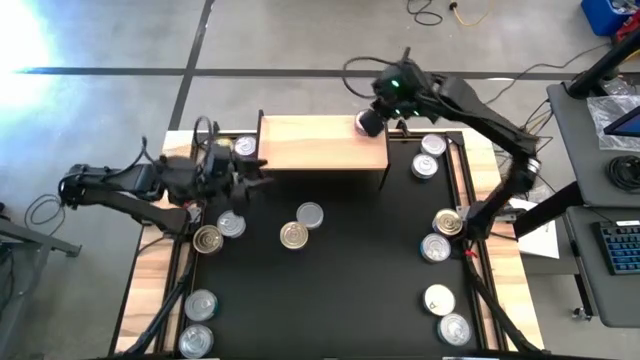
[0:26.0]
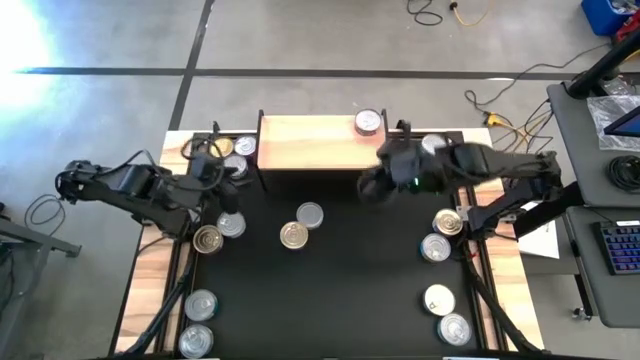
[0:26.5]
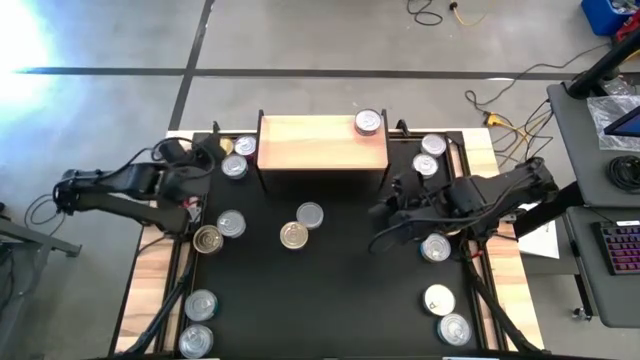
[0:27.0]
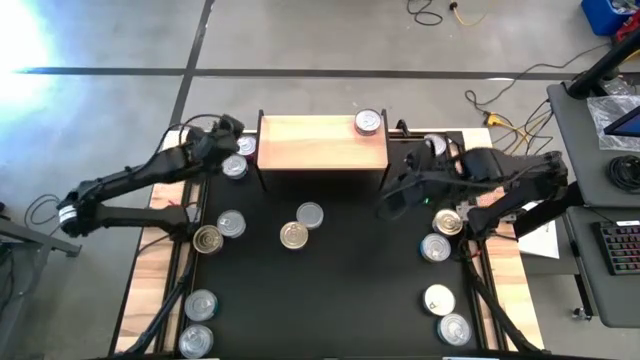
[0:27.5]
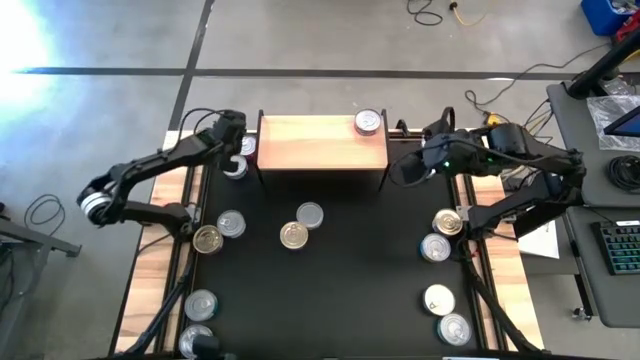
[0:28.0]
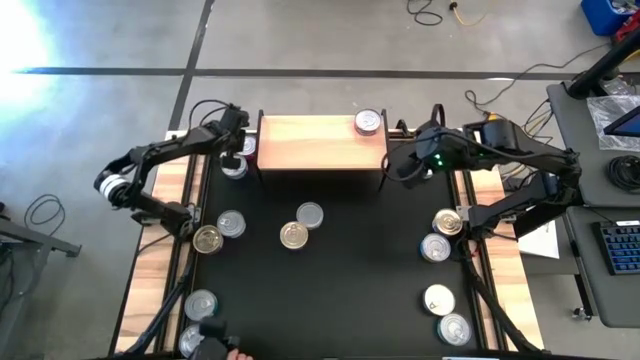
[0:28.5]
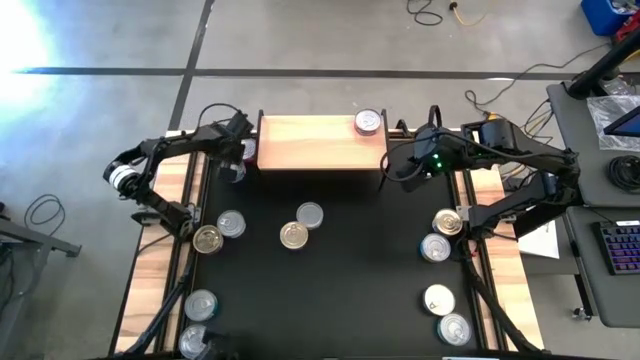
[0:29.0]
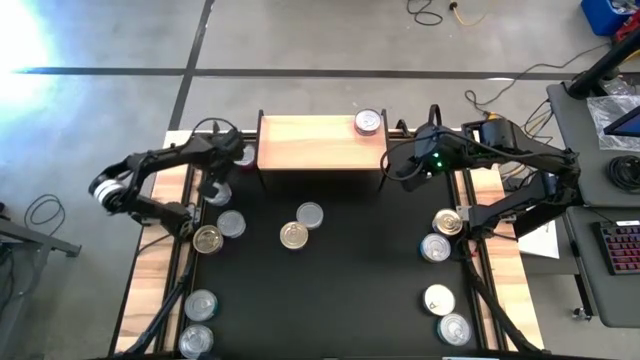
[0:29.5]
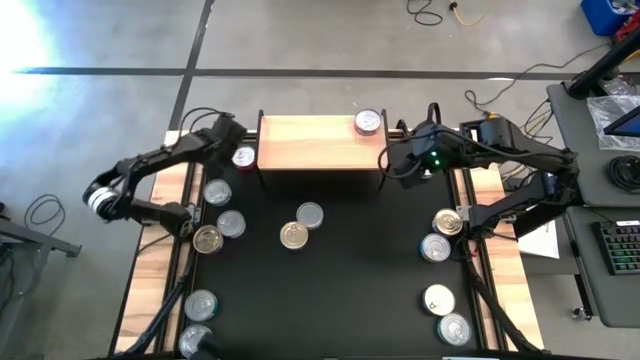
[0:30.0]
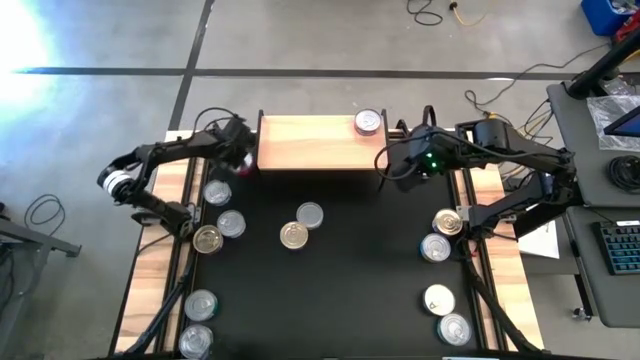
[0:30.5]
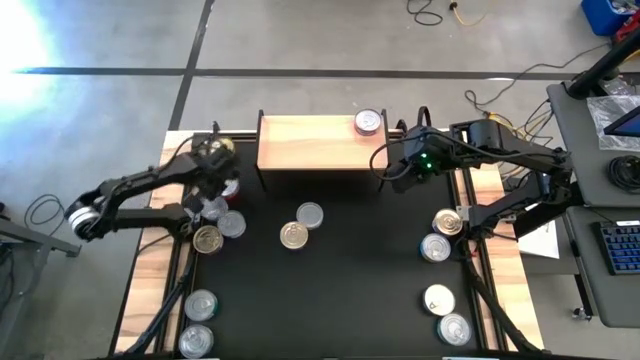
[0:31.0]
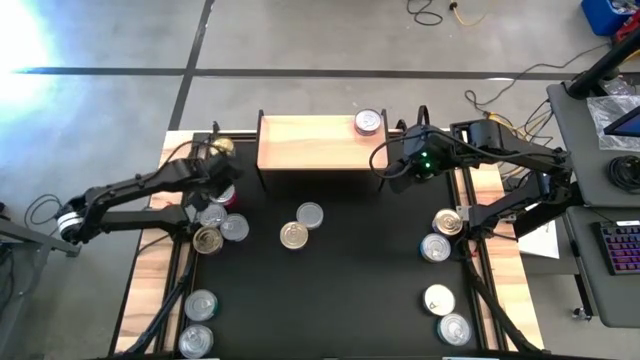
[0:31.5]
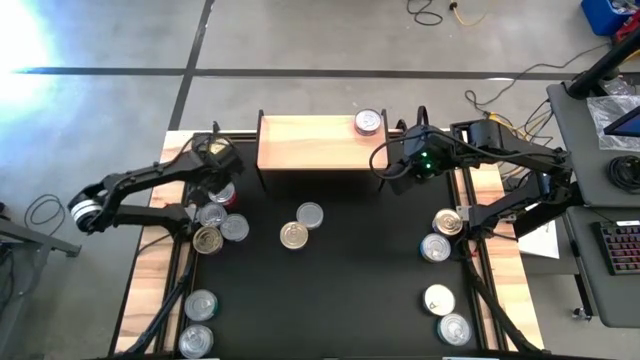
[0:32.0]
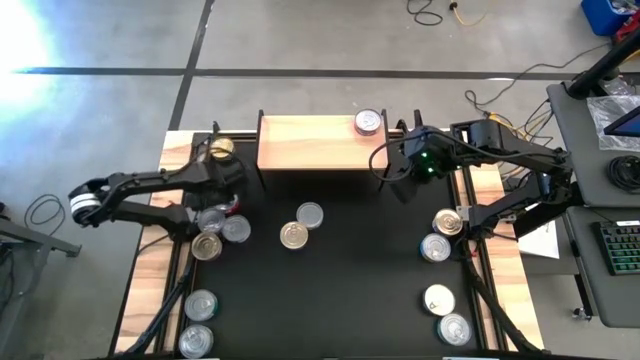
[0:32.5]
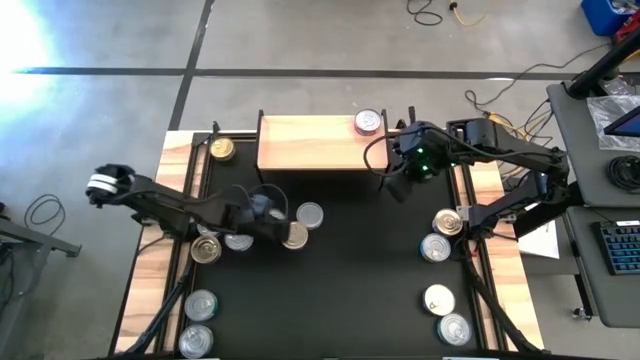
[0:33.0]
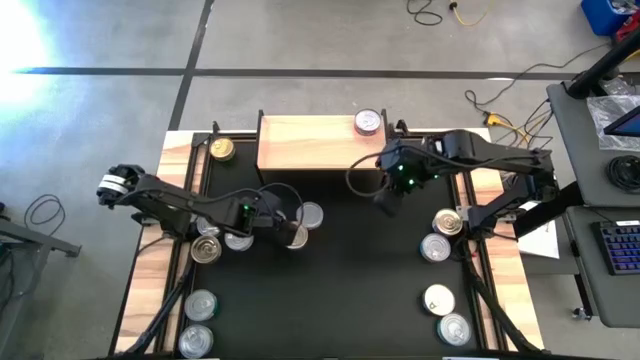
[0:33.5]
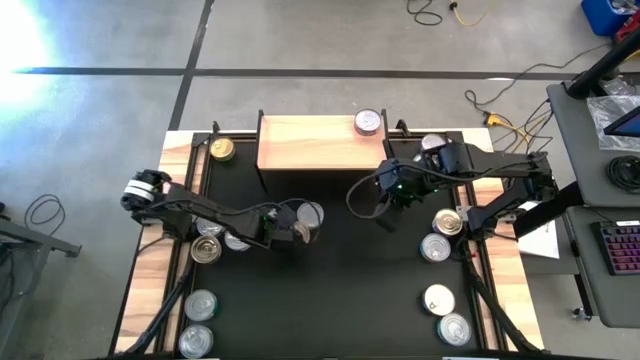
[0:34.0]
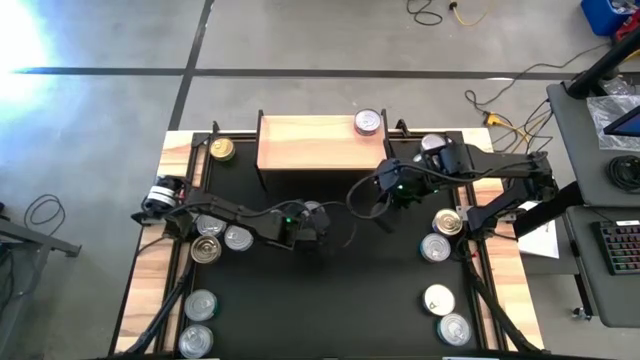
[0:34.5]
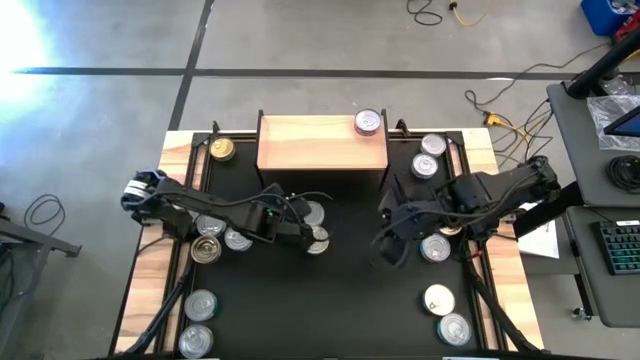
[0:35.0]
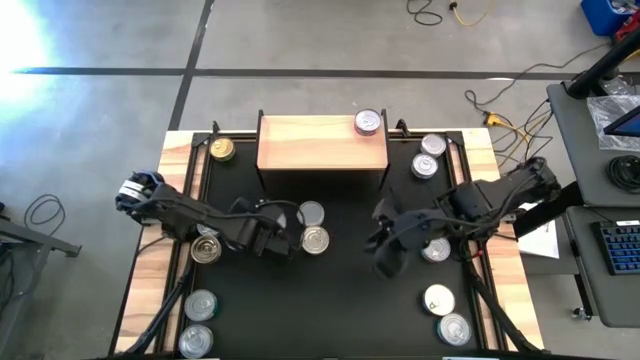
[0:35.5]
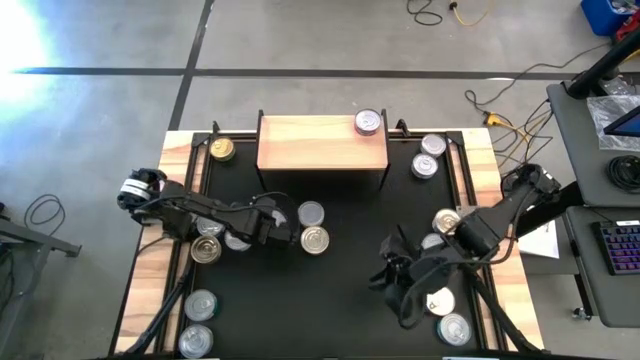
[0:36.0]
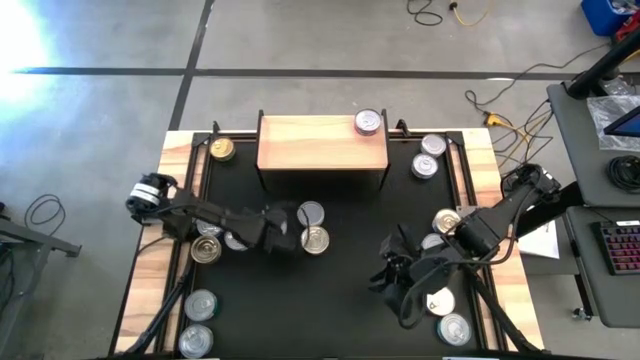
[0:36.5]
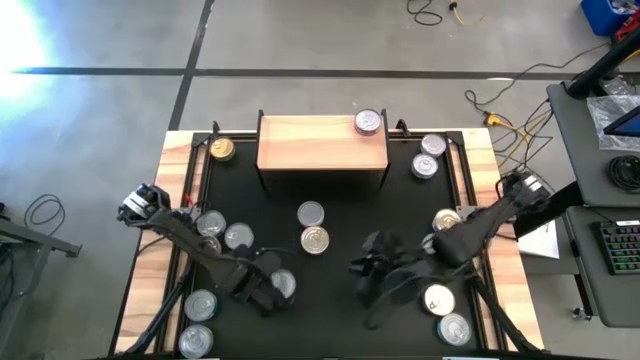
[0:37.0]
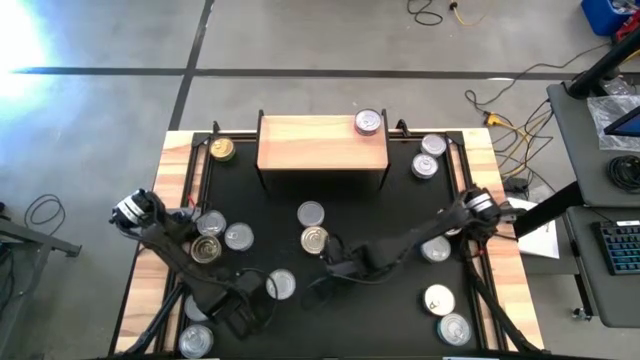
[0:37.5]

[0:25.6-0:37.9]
Task: Stack canned seafood by type on shelf
Stack the red tuna can on top of the other red tuna can on the shelf

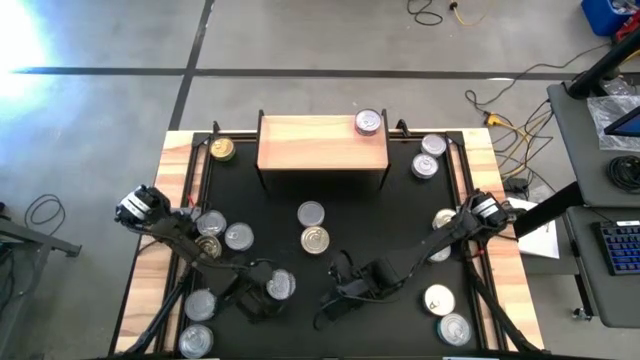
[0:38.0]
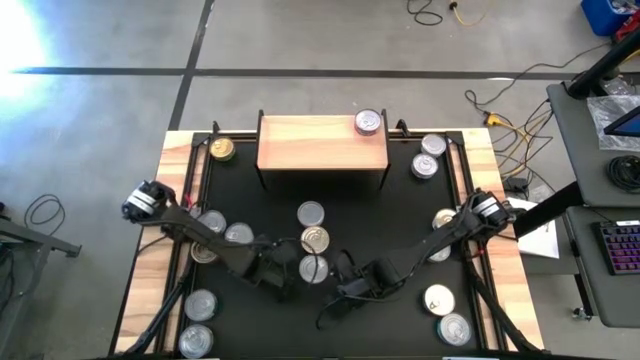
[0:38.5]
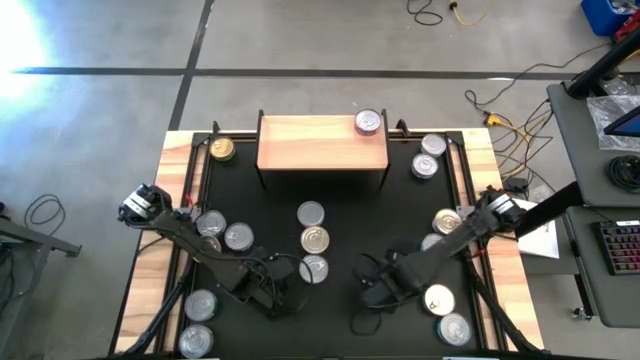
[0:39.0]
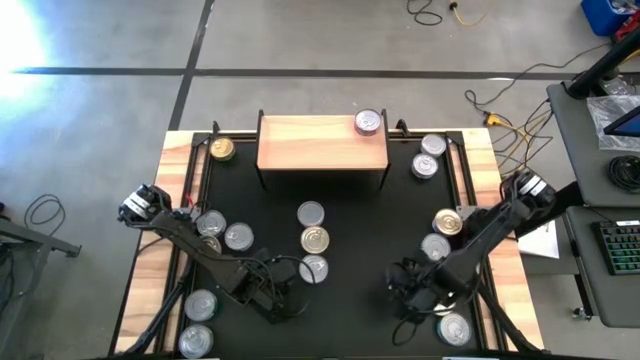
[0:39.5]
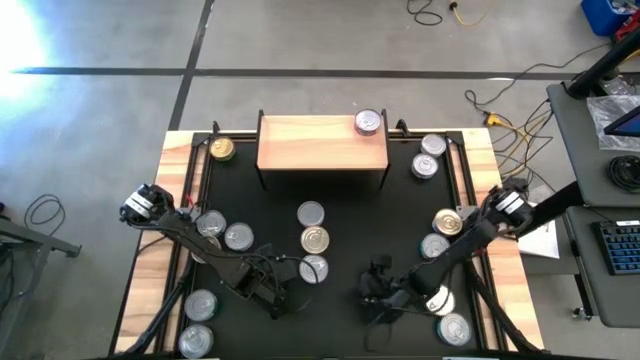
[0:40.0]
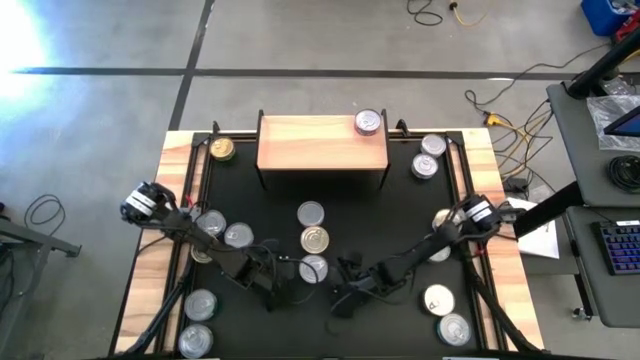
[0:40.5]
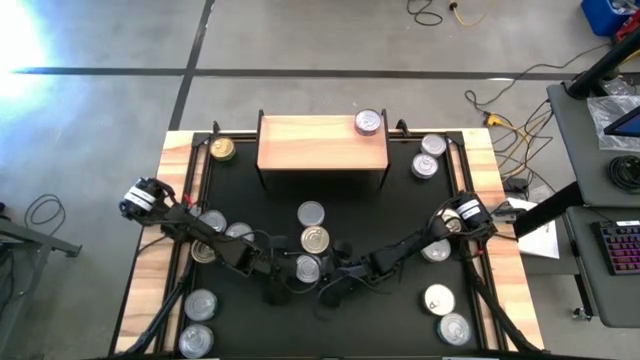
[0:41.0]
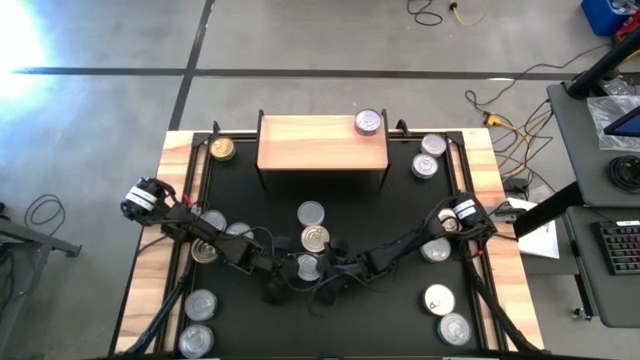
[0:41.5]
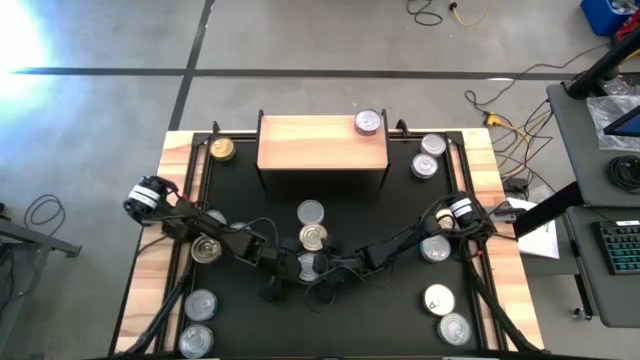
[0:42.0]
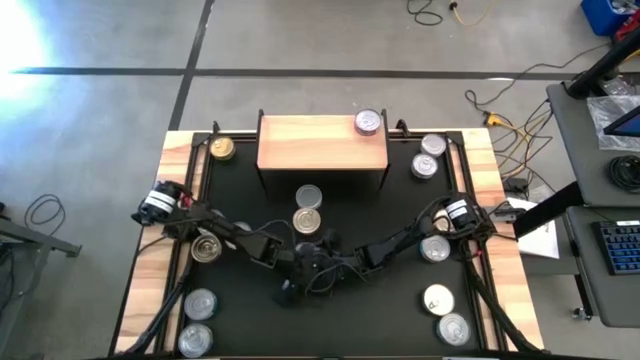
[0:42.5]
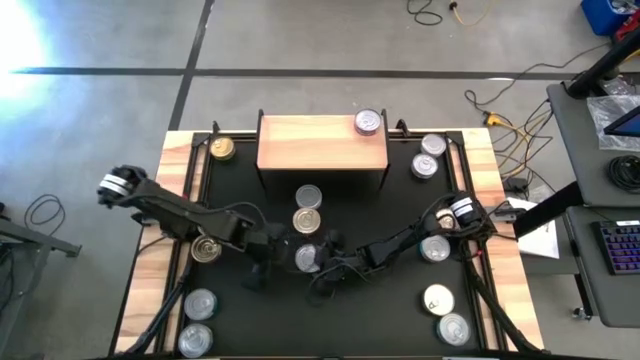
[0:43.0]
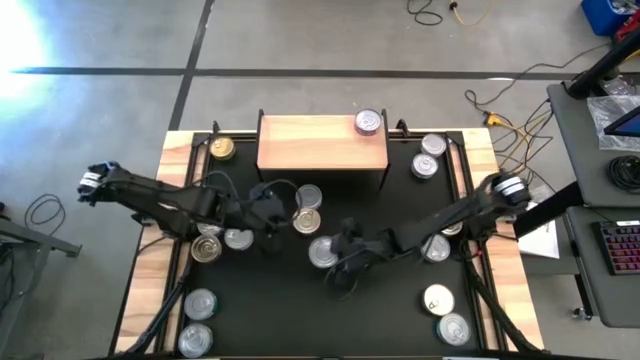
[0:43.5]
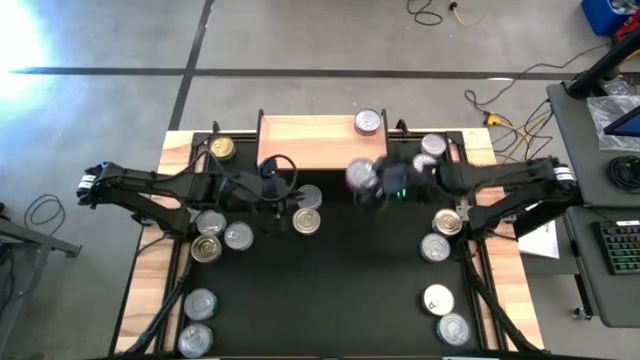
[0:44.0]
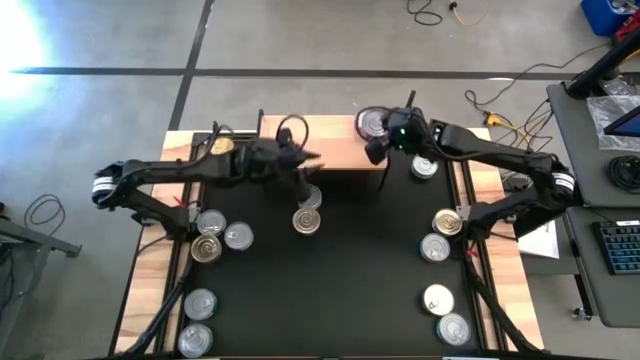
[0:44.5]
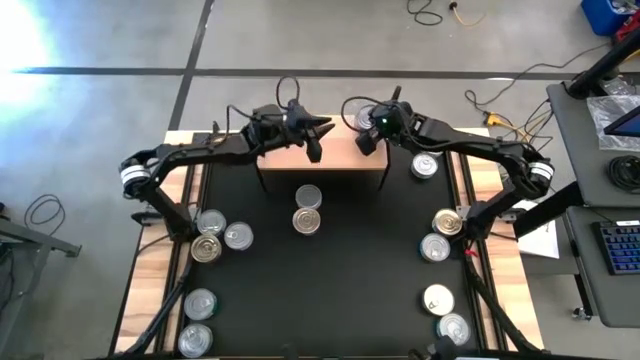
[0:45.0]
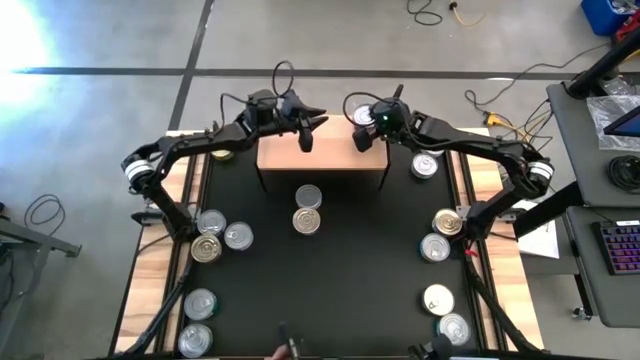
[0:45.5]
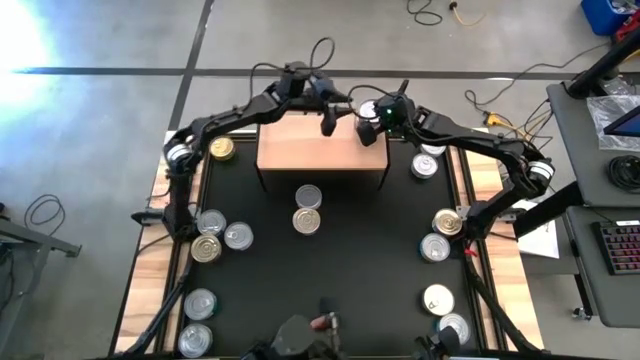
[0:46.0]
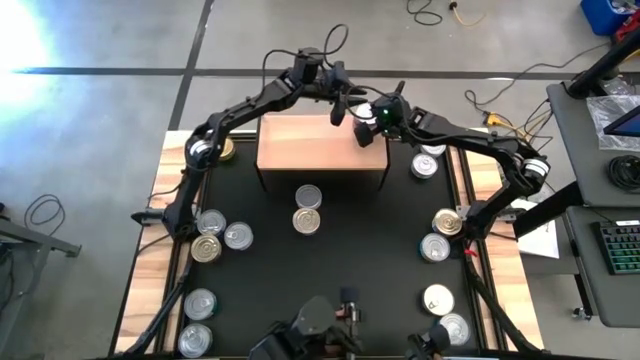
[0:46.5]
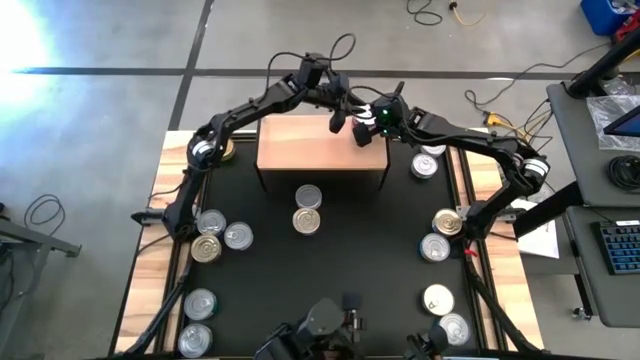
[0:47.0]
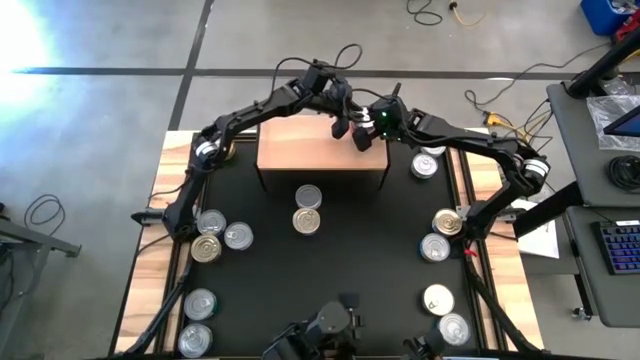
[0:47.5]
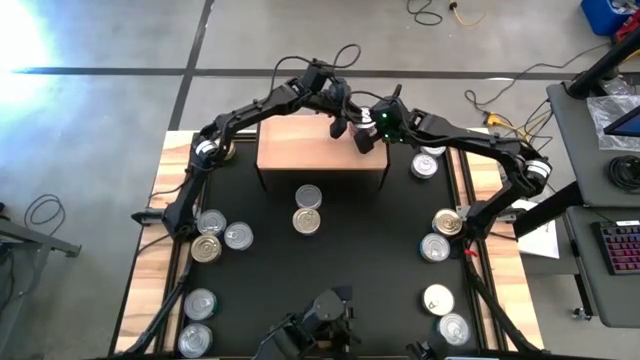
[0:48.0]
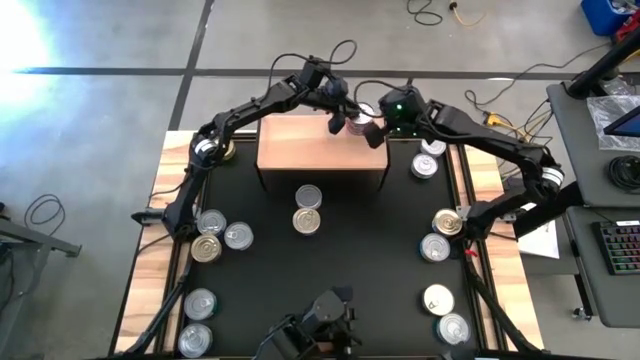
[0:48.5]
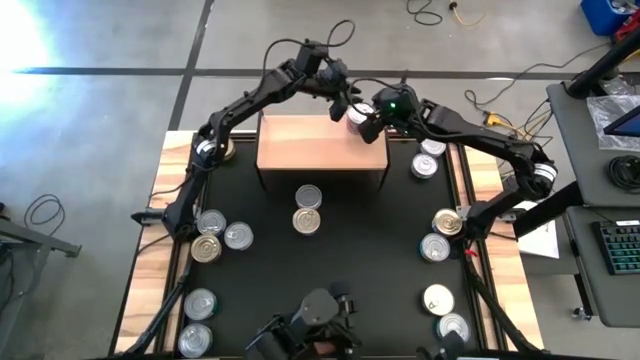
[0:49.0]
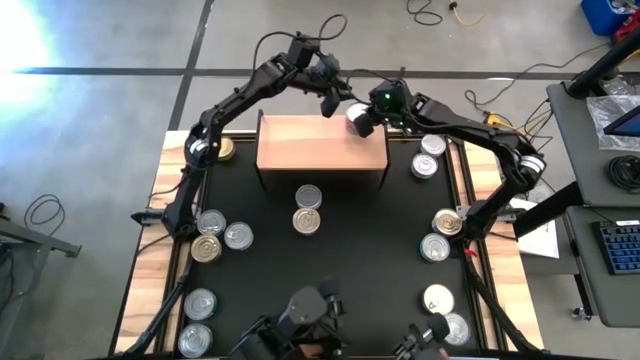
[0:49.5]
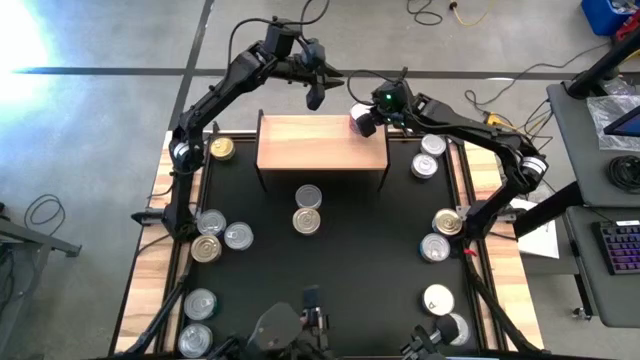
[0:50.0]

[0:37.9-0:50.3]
Stack the red tuna can on top of the other red tuna can on the shelf
